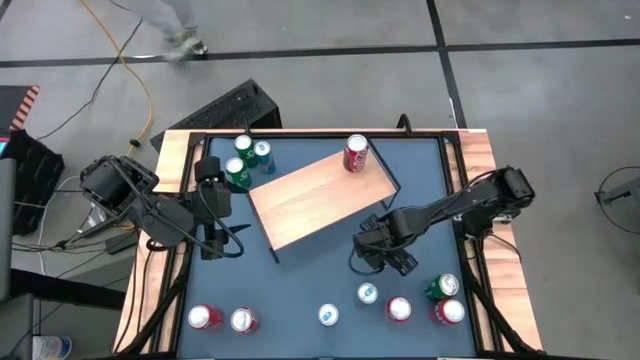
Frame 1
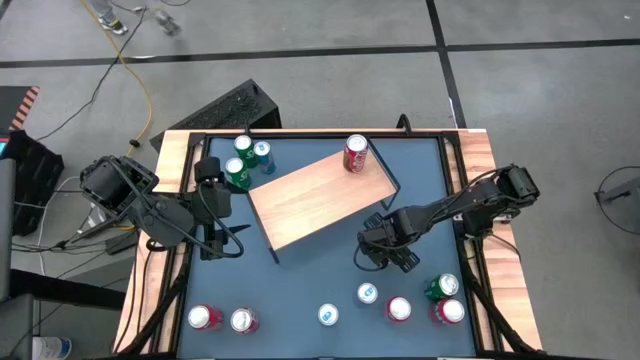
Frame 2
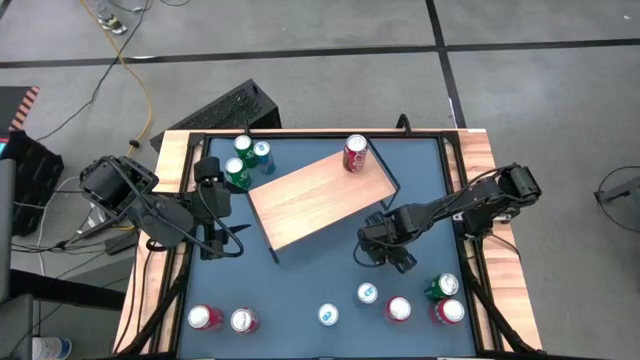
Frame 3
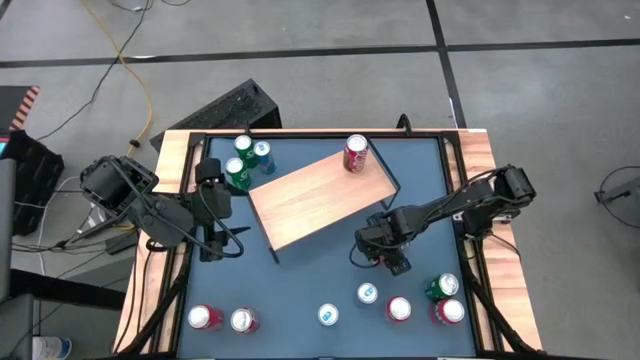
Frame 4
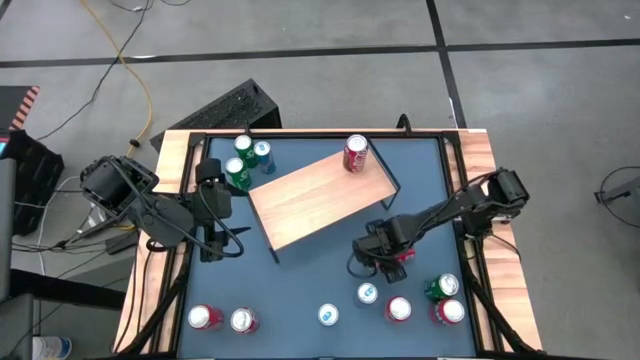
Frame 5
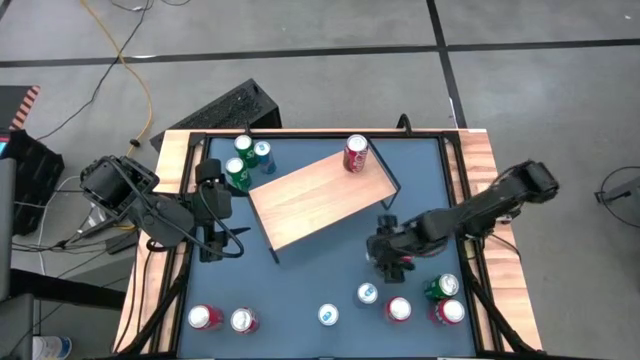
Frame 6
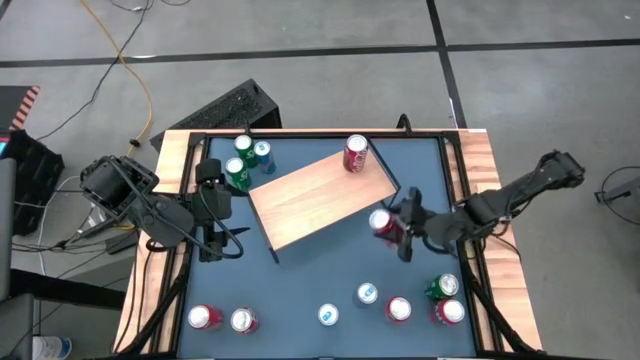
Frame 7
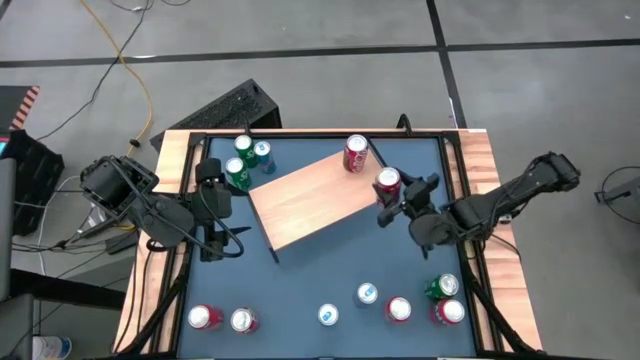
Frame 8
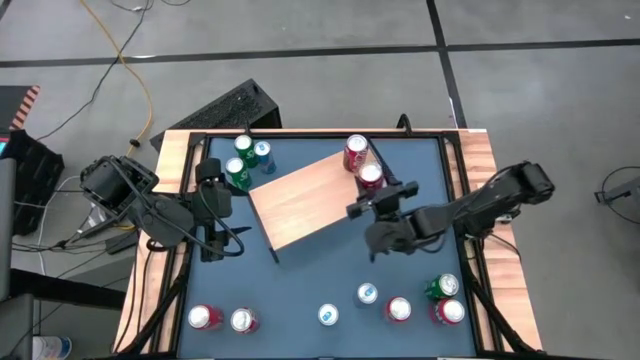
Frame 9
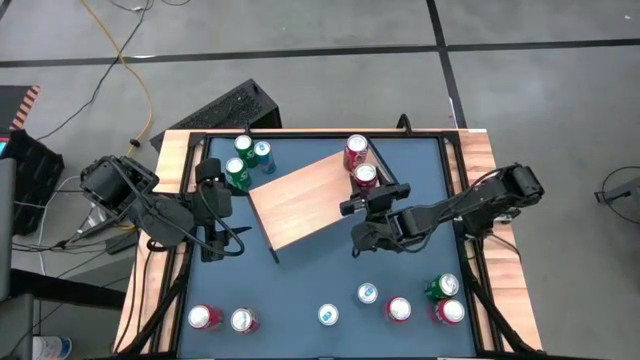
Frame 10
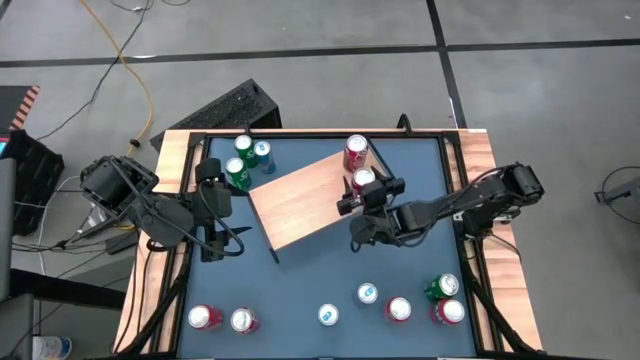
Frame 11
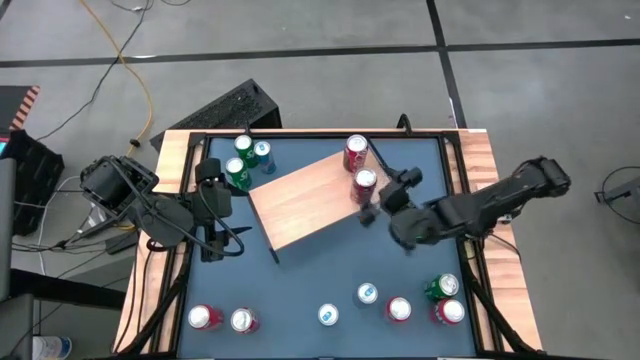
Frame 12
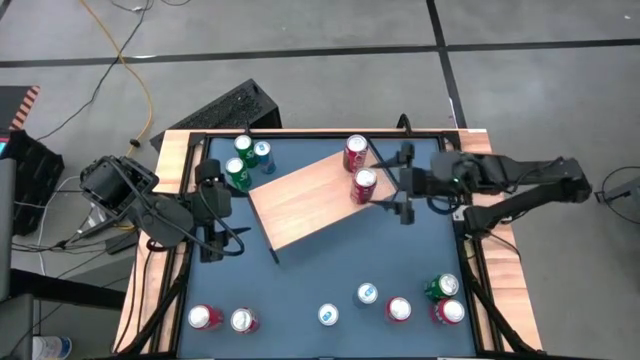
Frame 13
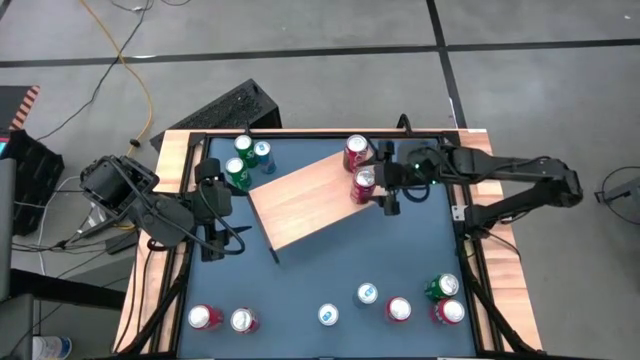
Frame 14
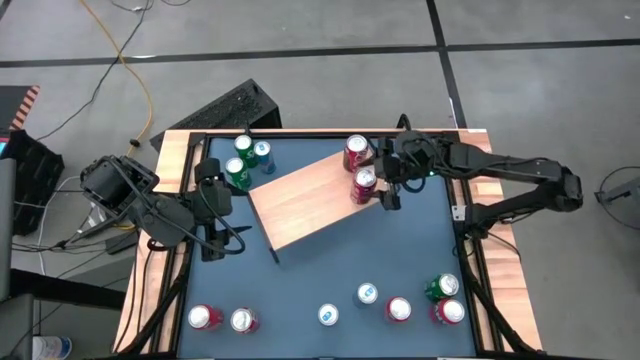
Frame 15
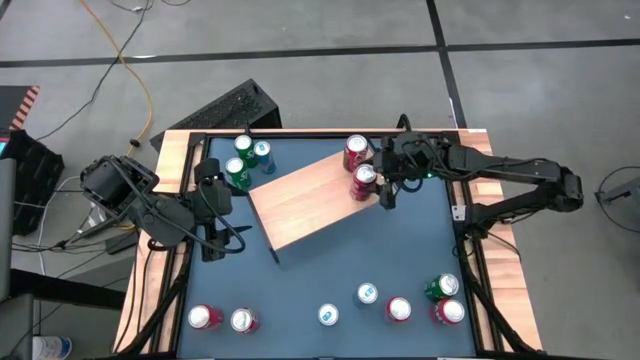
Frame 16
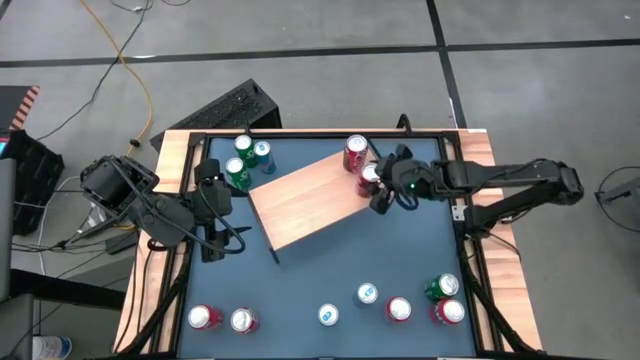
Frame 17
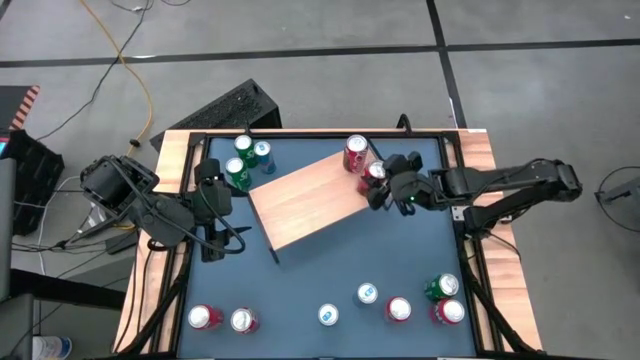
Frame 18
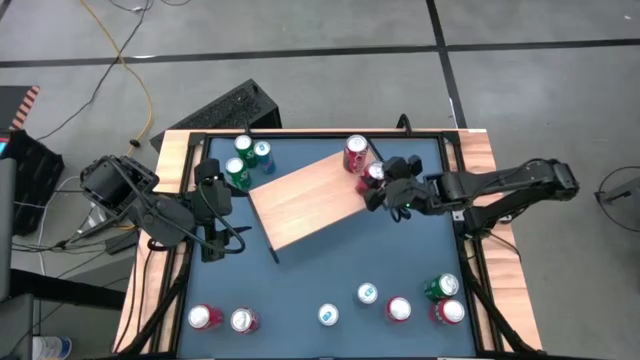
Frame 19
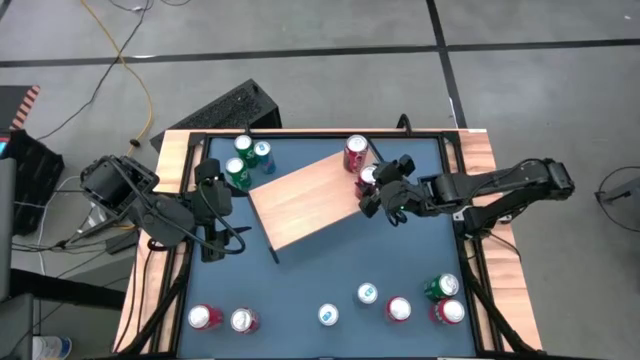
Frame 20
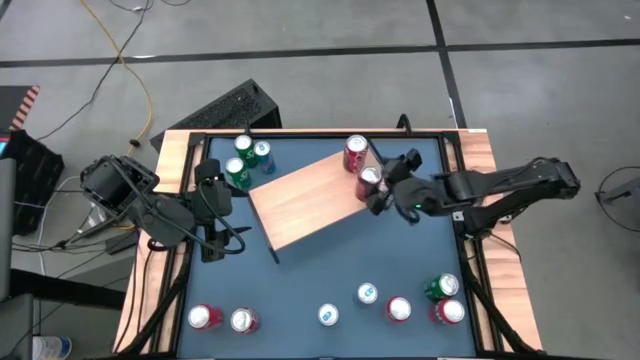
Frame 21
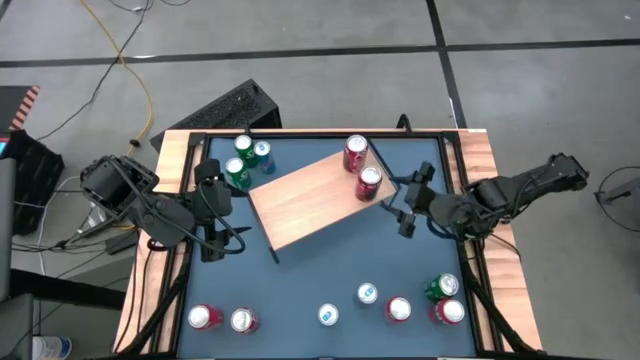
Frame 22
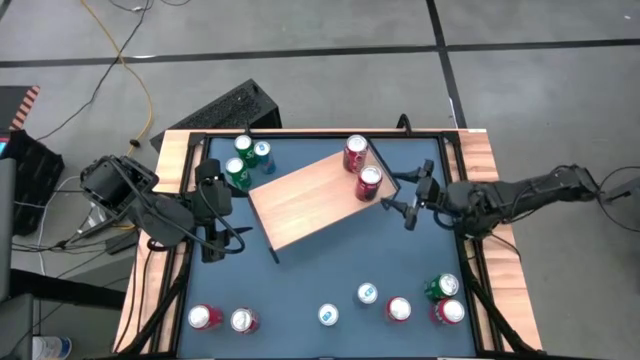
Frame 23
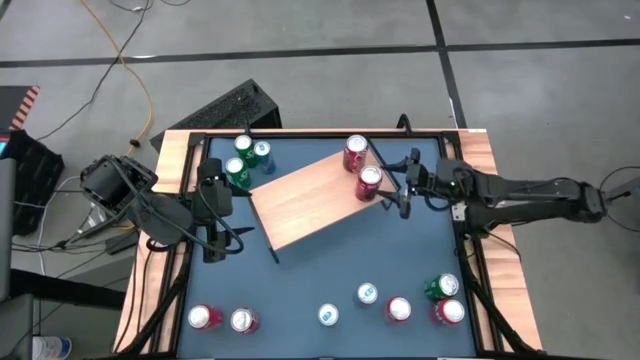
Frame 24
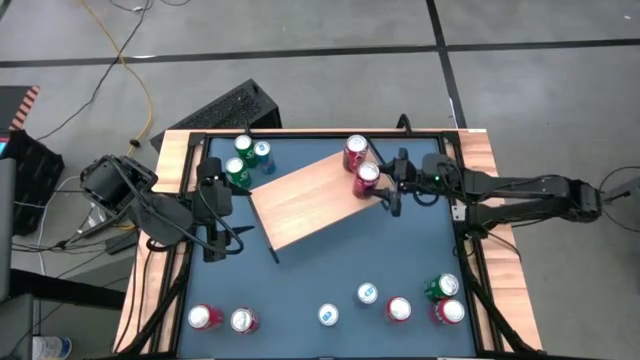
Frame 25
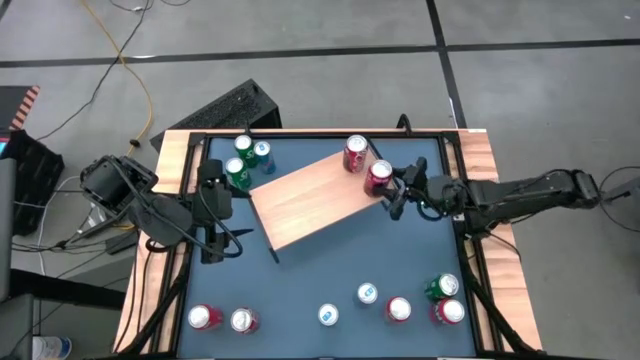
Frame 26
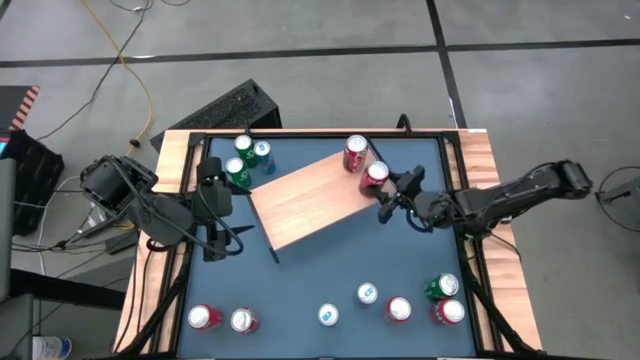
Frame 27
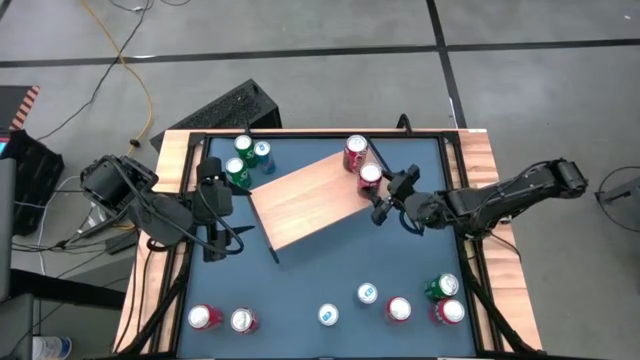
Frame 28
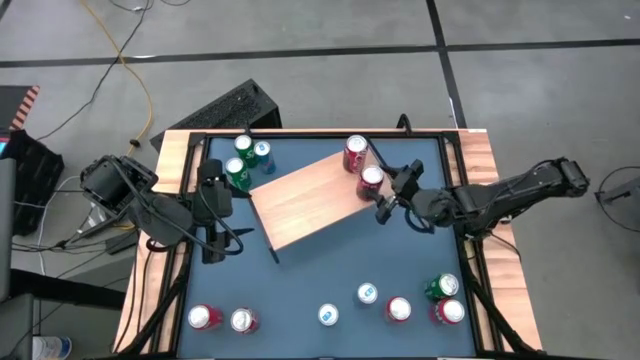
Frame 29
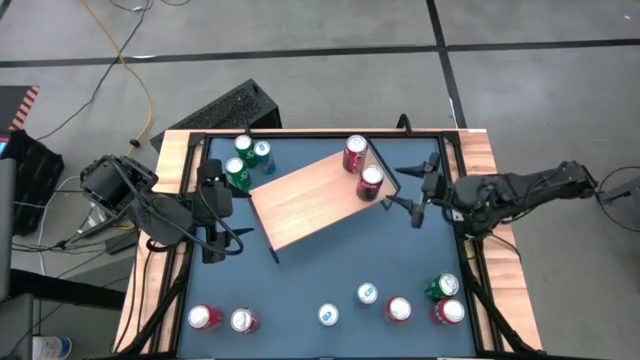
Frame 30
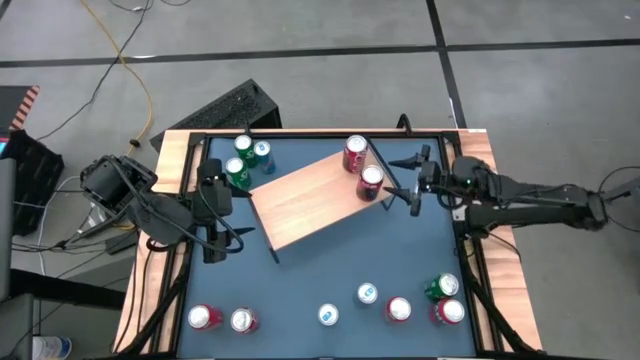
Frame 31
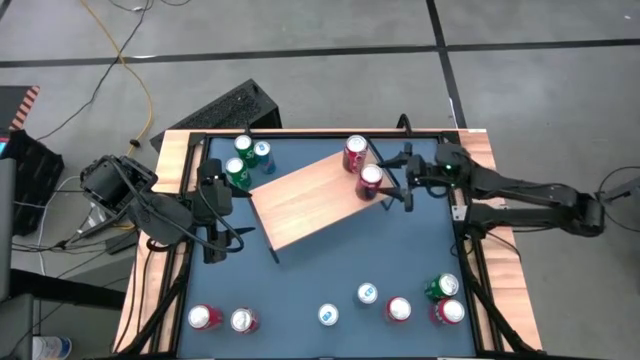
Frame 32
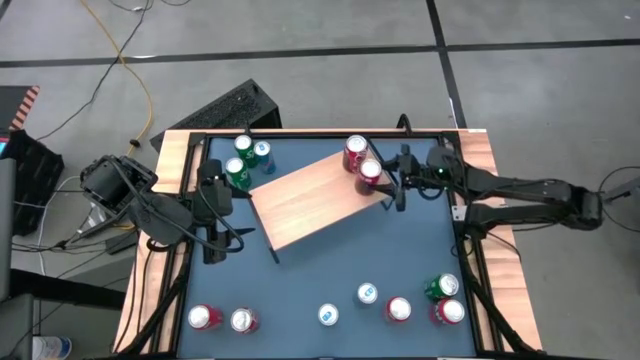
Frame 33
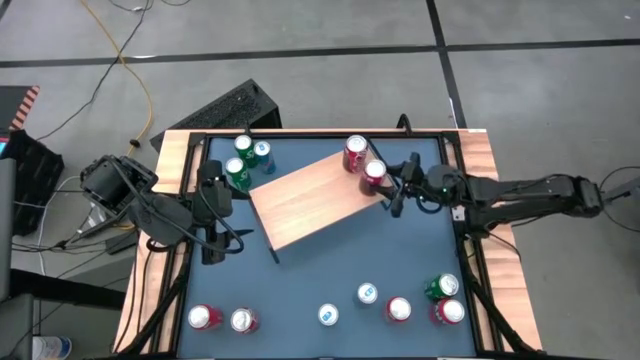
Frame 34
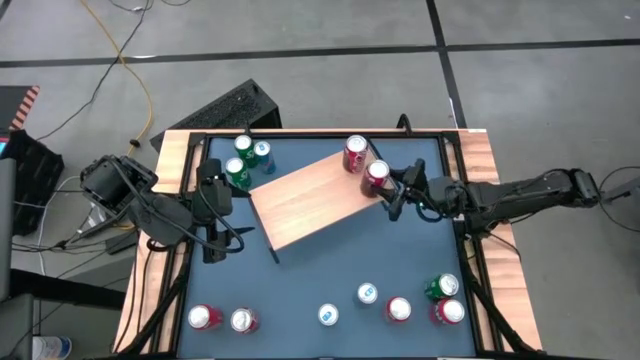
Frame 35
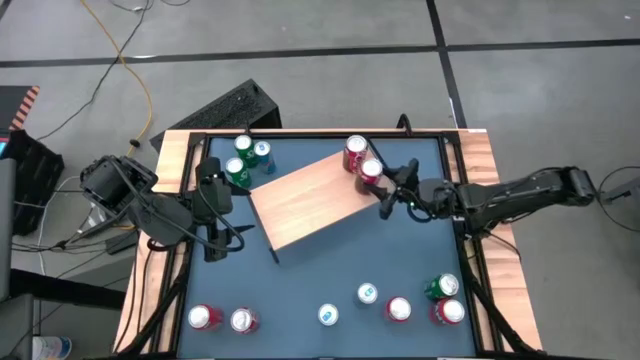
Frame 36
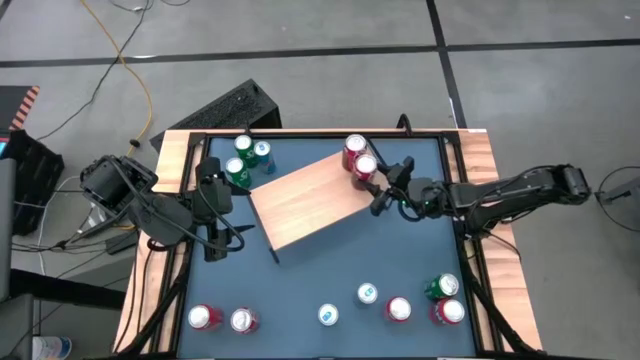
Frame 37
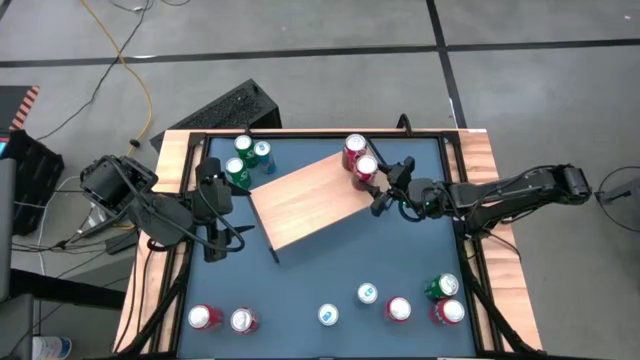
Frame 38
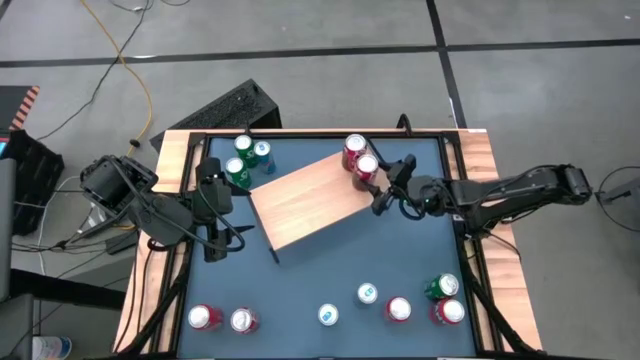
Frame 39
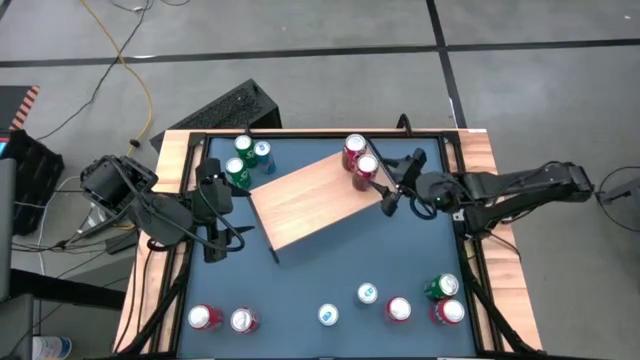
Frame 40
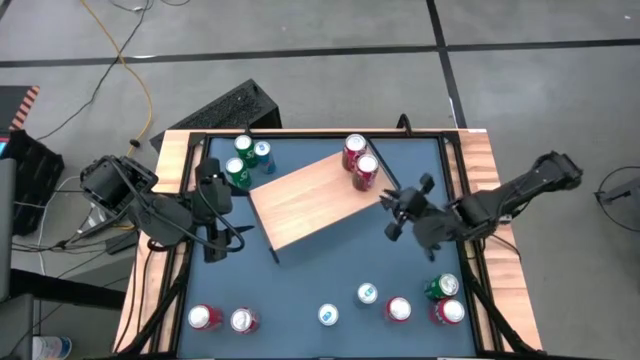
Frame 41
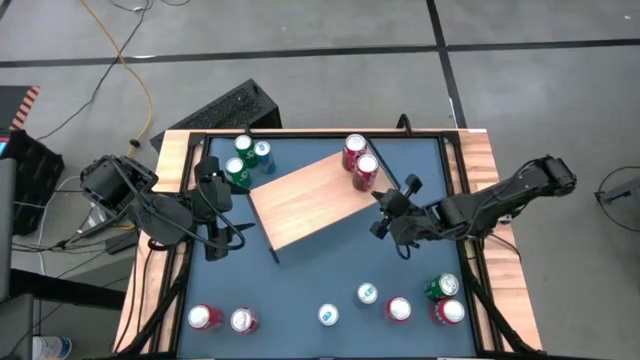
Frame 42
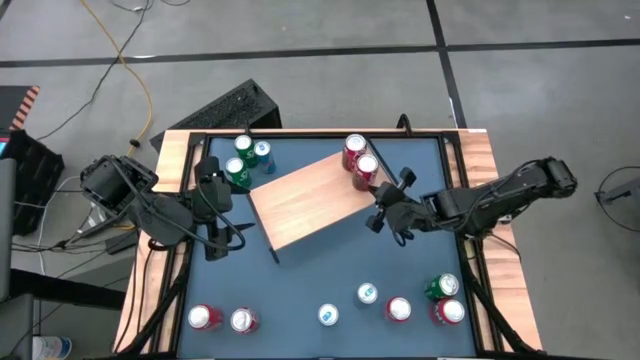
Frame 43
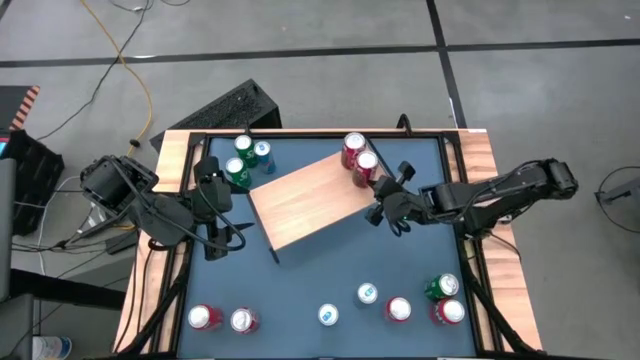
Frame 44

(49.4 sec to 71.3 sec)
Task: Place canned beverage on shelf
Put the top red white soda can on the shelf aligned with the other red white soda can
